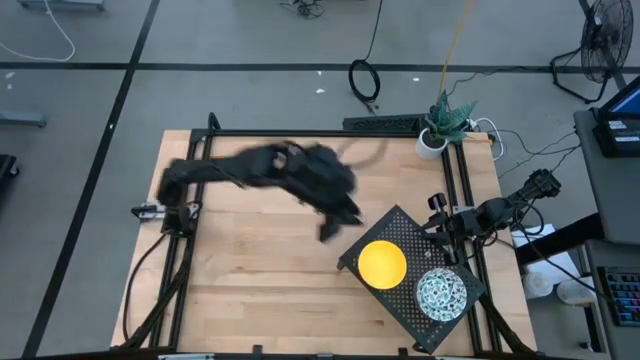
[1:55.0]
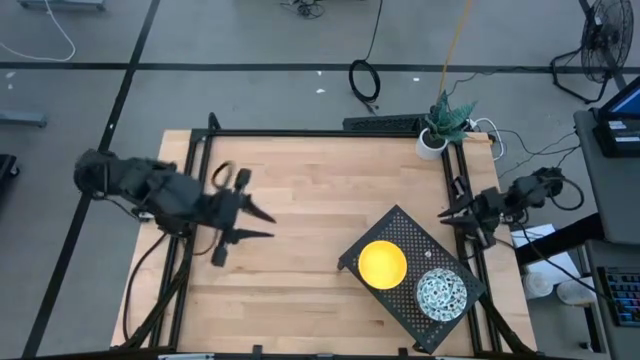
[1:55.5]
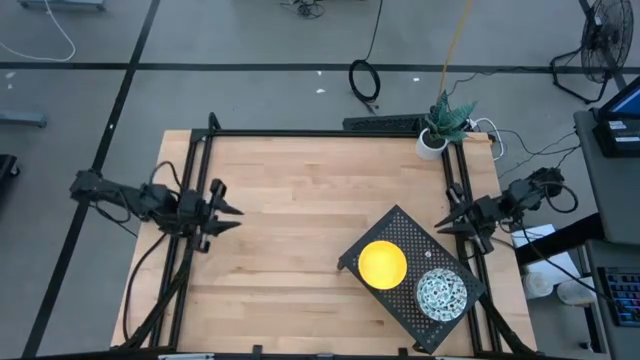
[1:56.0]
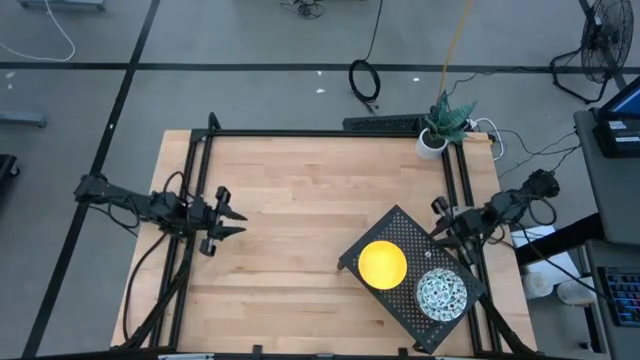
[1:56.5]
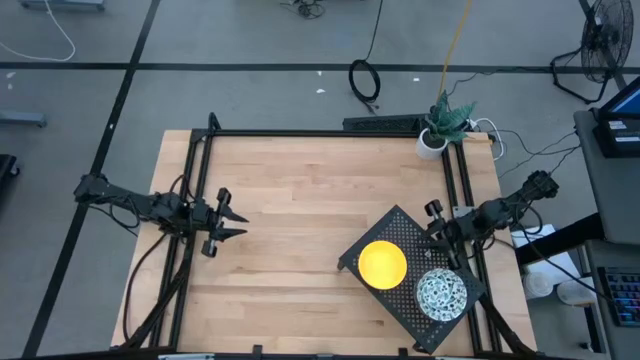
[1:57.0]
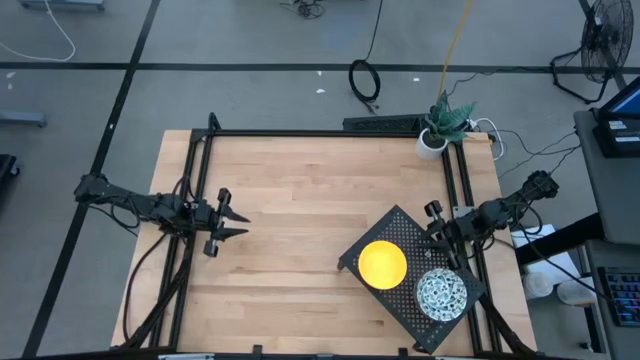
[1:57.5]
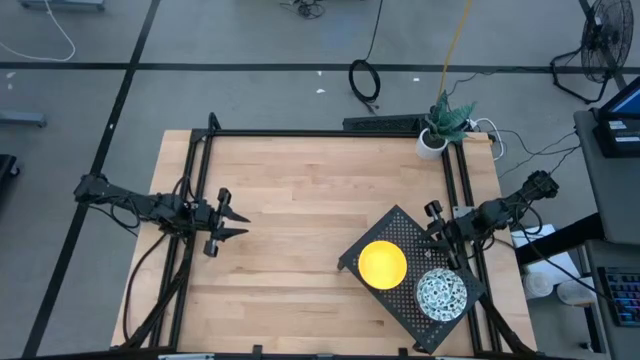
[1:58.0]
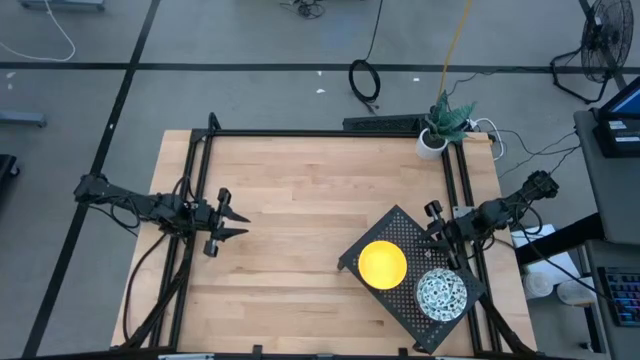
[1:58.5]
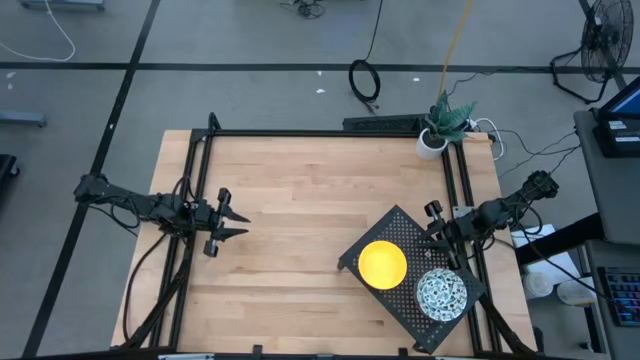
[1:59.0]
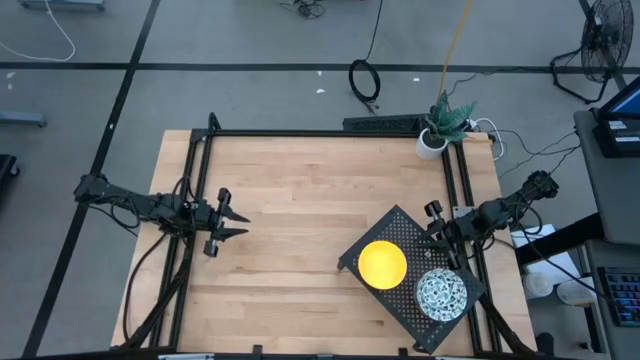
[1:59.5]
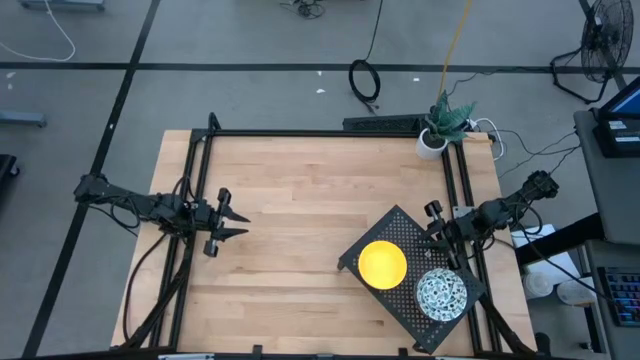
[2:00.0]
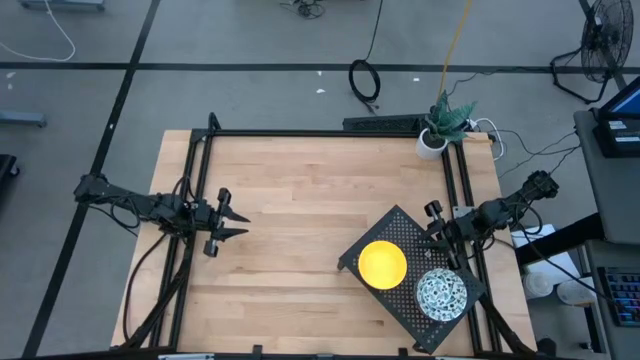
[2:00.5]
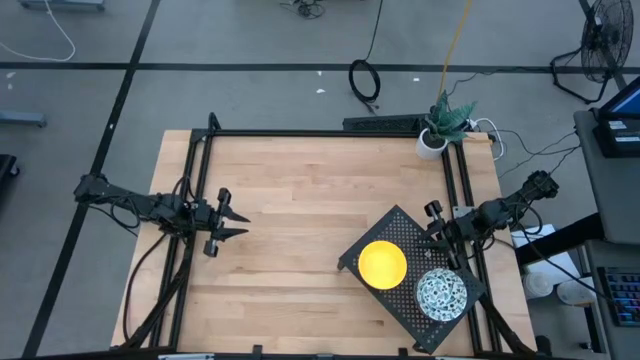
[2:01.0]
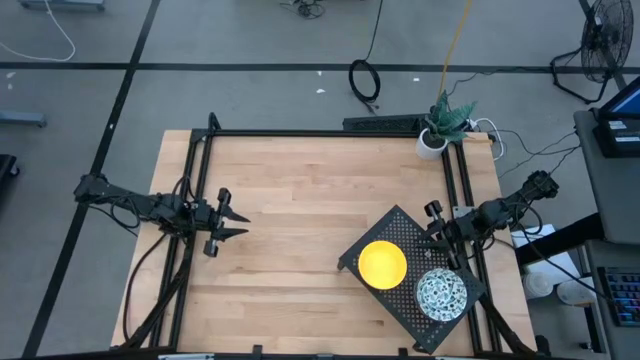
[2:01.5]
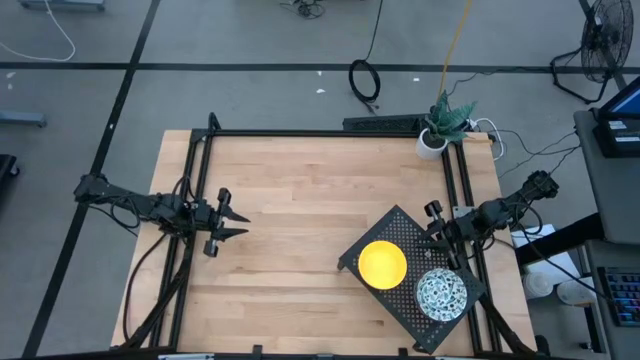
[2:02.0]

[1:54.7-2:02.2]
Task: Pick & Place Mini bowls
Return to Home Position

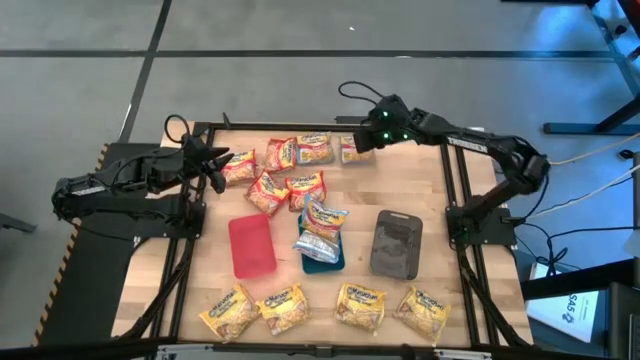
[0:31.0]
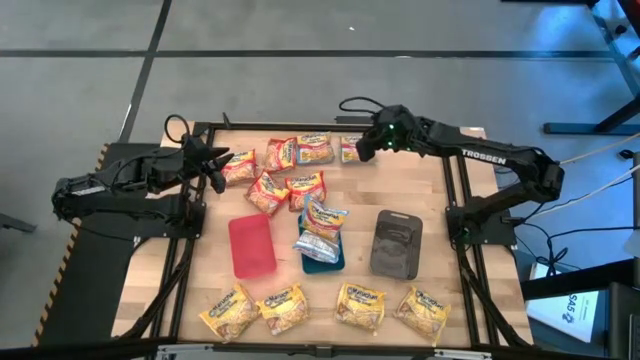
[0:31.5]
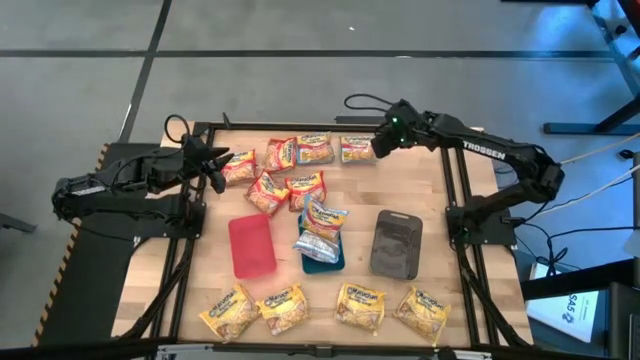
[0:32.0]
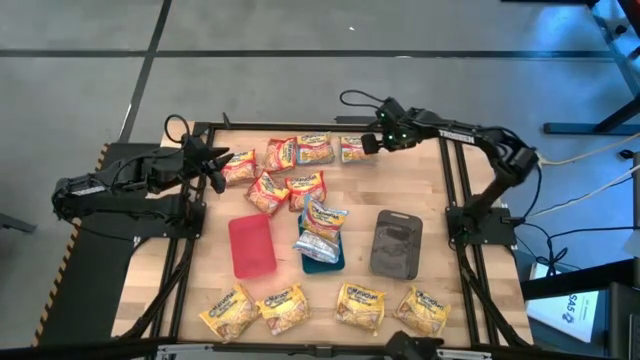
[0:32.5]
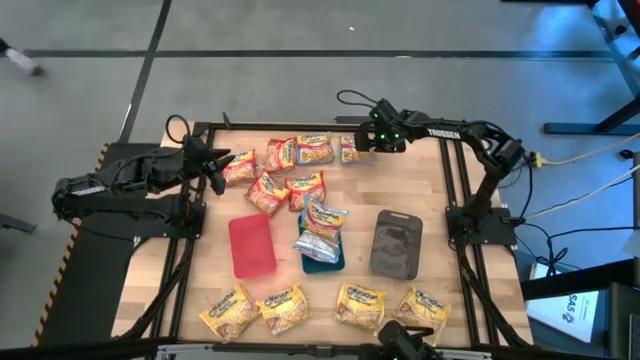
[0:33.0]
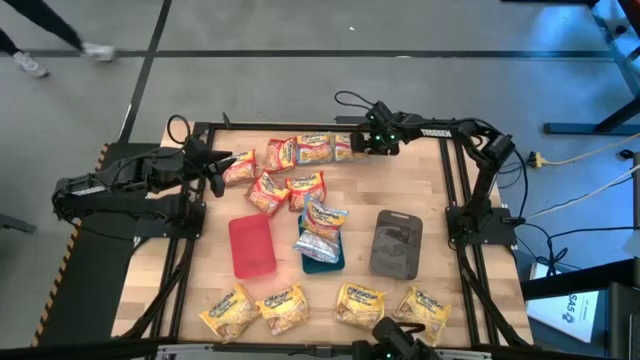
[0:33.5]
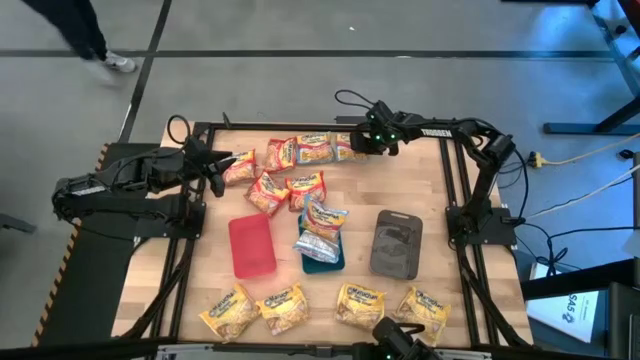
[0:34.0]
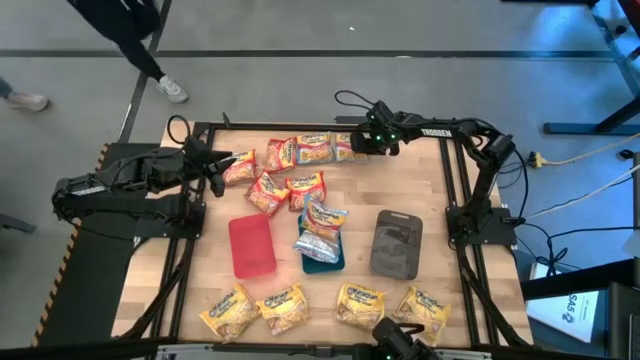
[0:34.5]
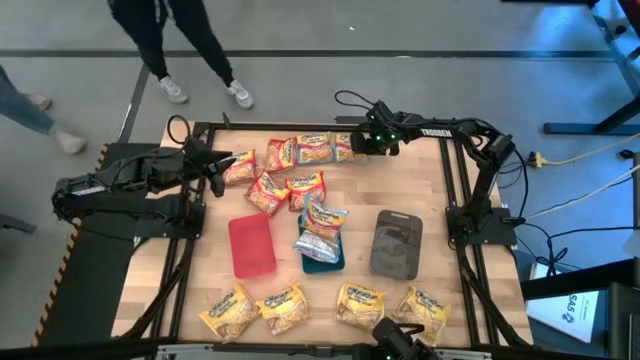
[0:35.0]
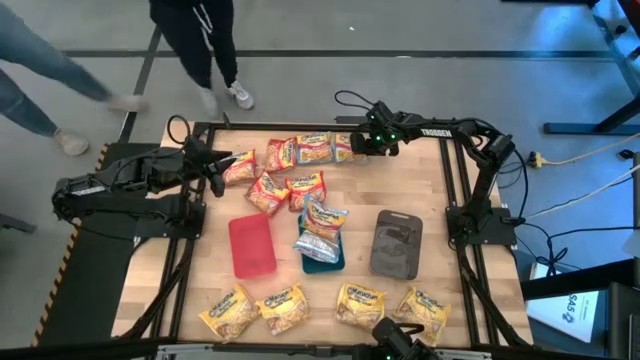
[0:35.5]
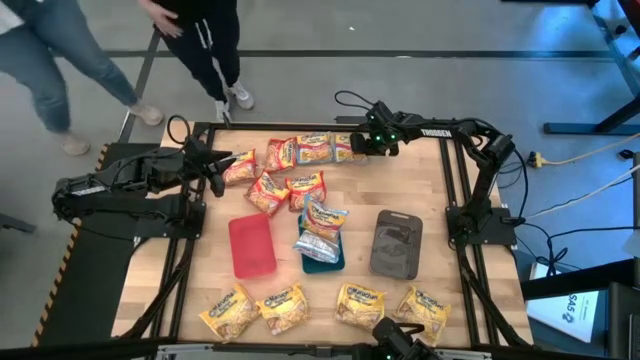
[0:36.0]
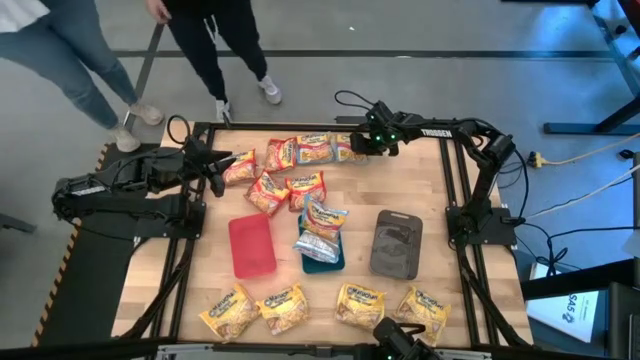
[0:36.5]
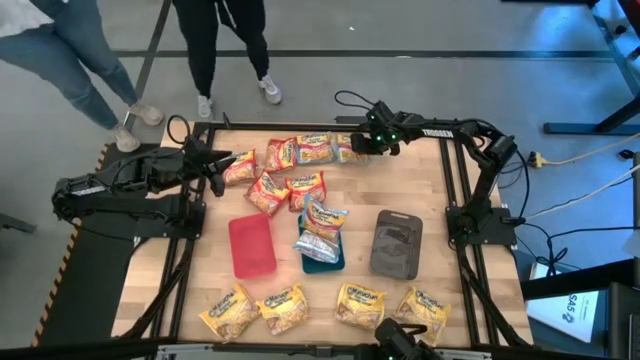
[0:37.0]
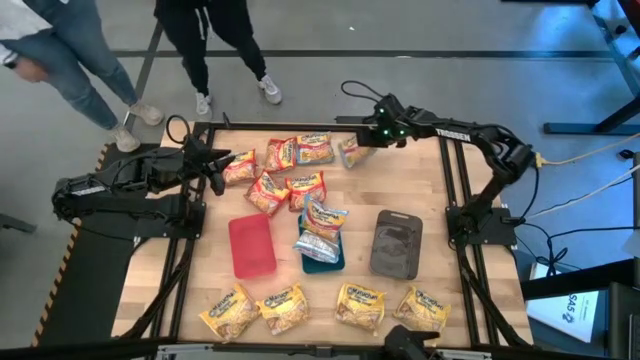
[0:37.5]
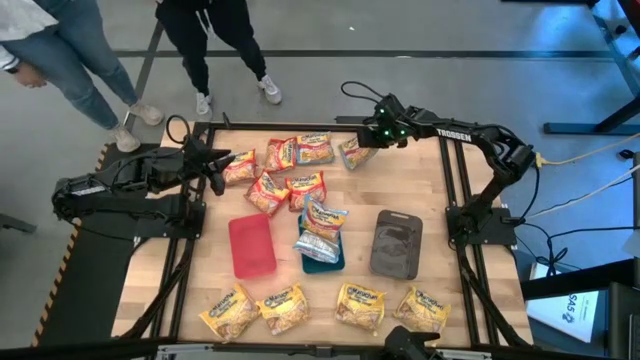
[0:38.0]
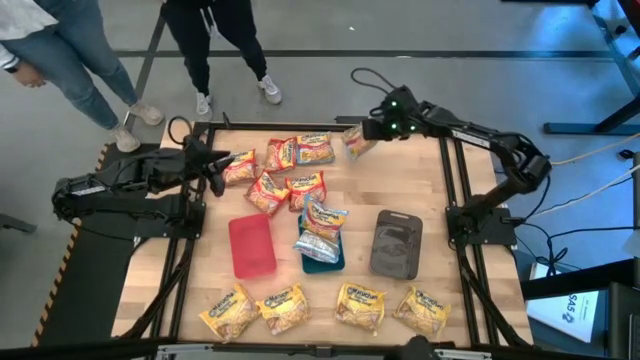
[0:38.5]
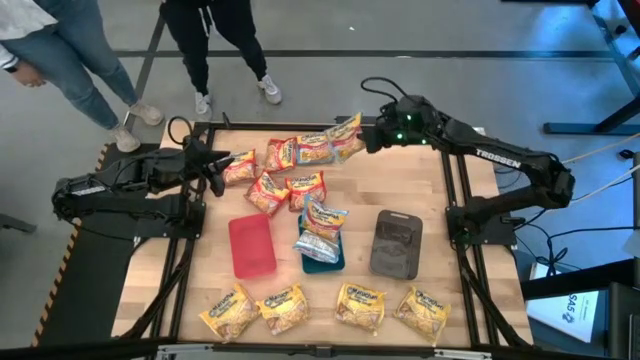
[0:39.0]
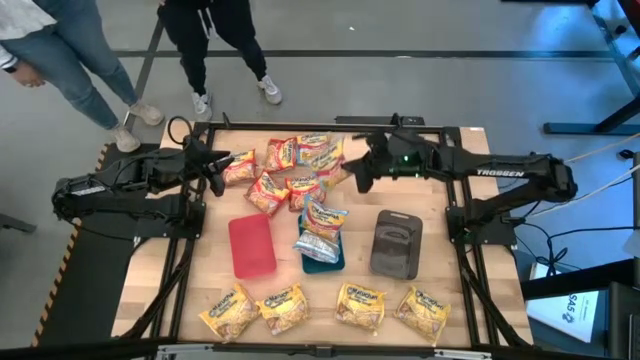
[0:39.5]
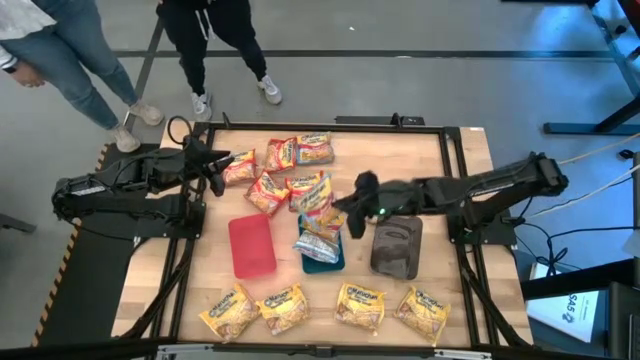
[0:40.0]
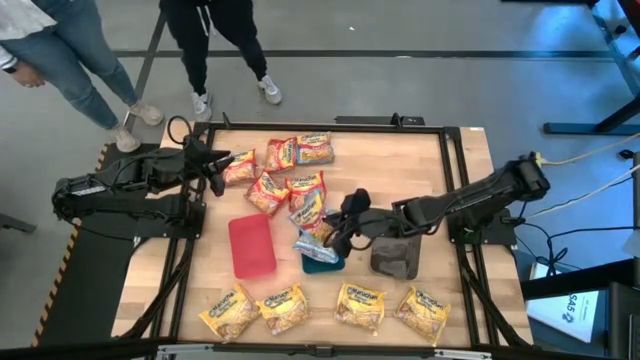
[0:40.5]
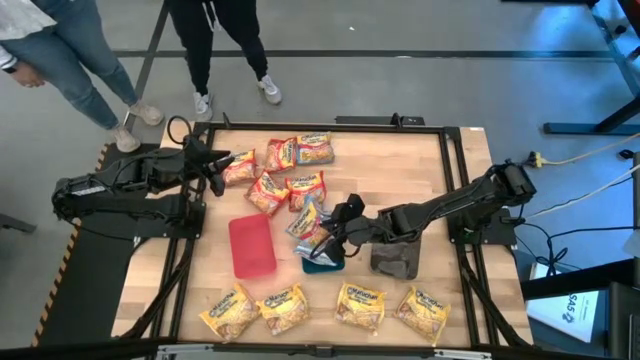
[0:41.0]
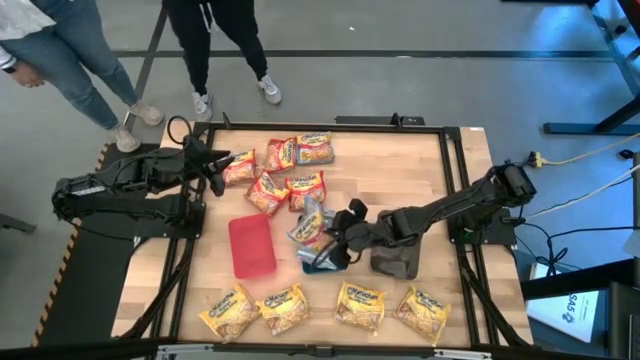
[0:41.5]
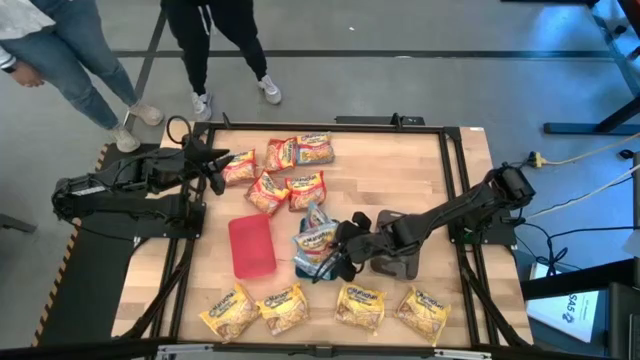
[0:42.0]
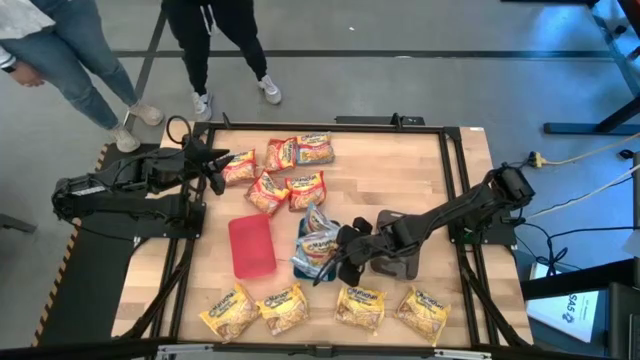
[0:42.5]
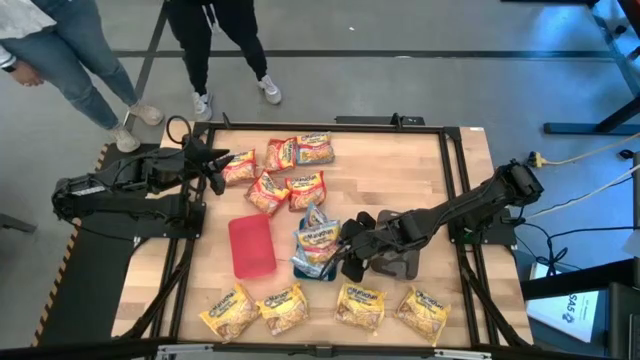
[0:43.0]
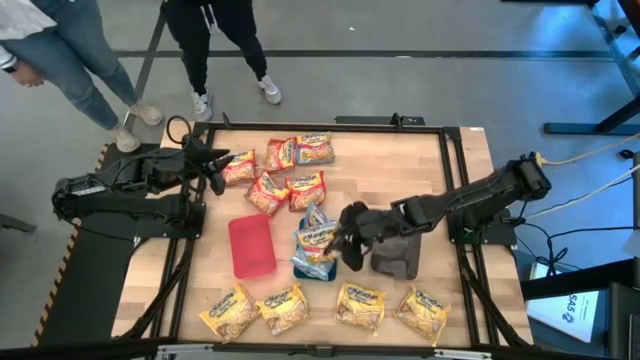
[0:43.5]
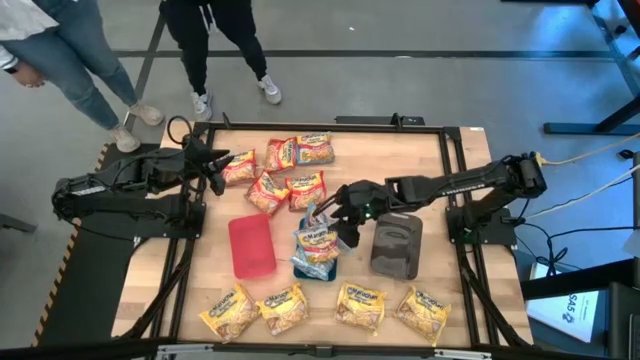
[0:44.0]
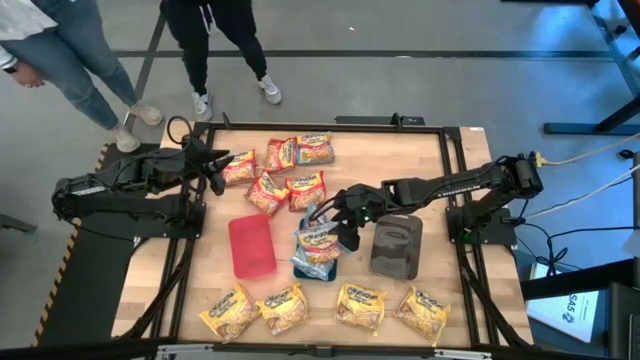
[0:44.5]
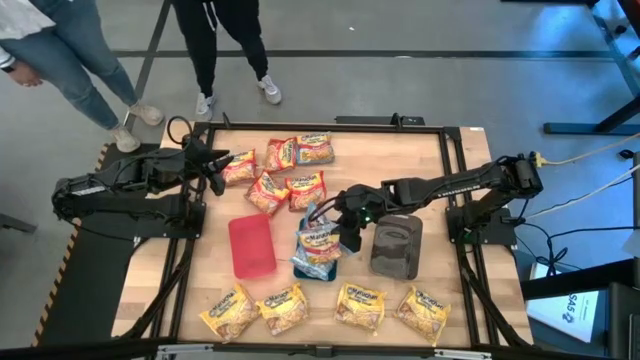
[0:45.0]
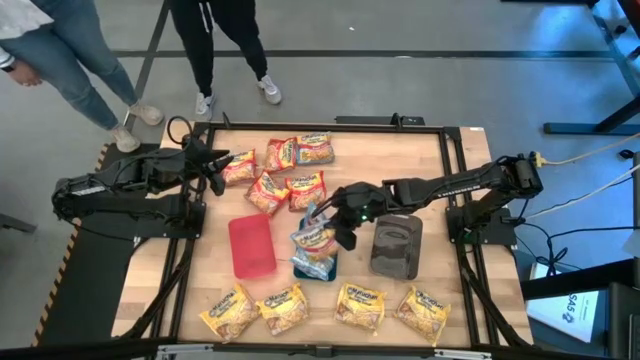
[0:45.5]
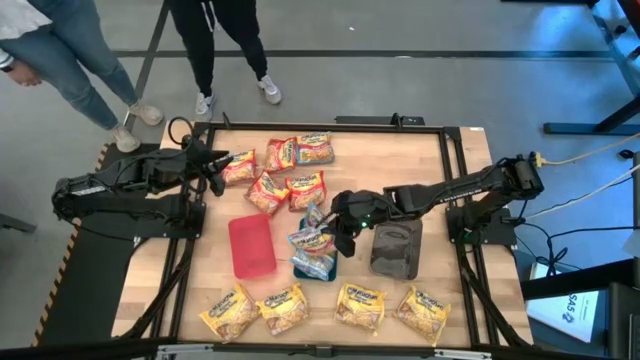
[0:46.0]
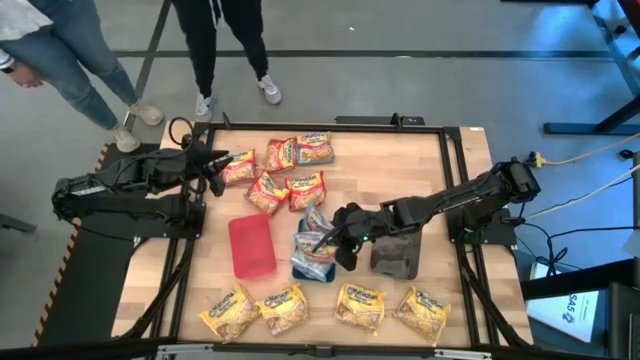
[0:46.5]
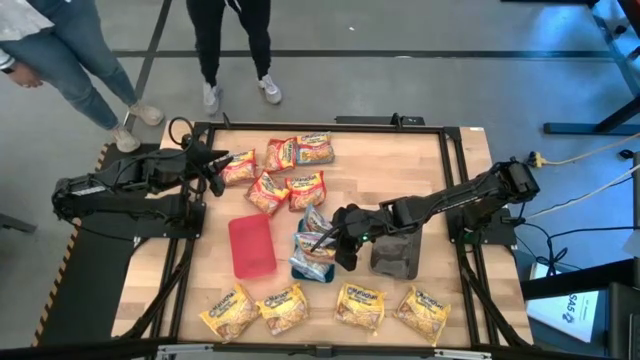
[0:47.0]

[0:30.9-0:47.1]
Task: Sort Maruchan noodles
Put the blue noodle pack into the blue bin
